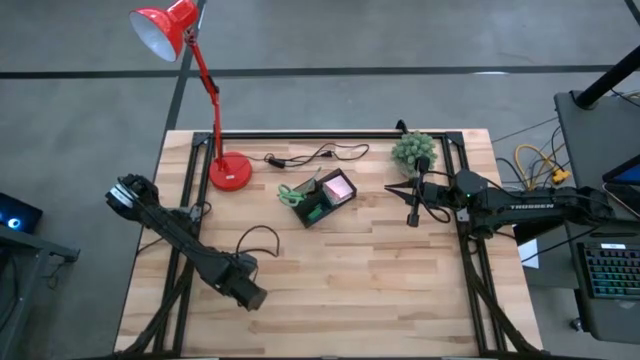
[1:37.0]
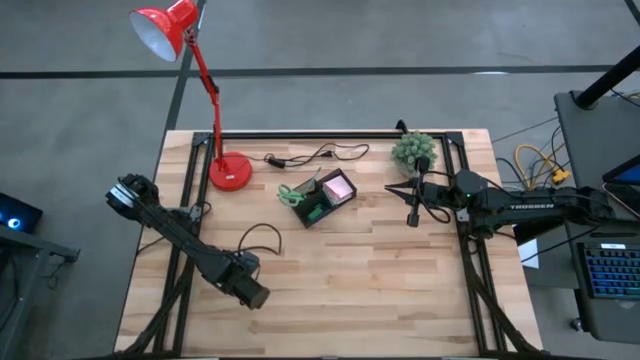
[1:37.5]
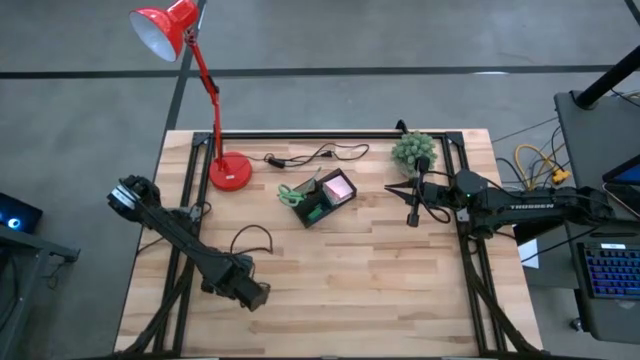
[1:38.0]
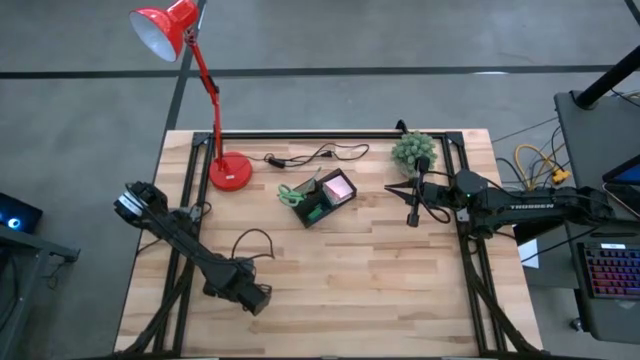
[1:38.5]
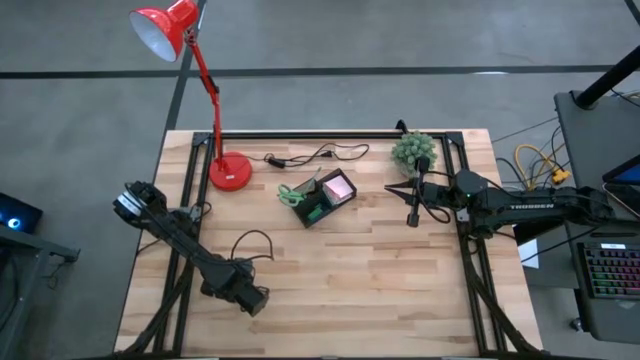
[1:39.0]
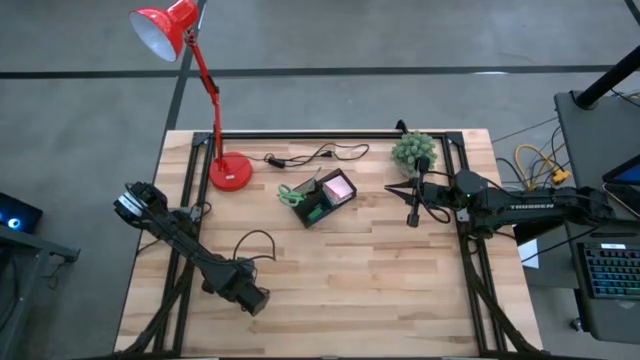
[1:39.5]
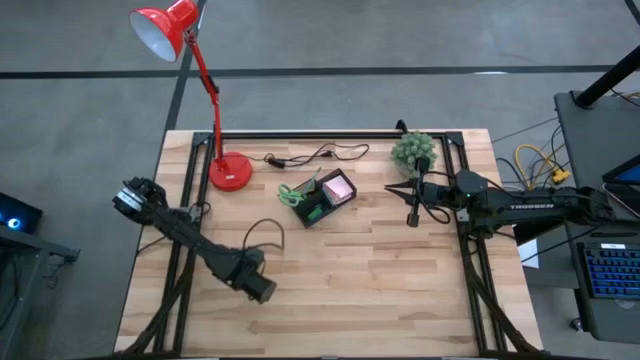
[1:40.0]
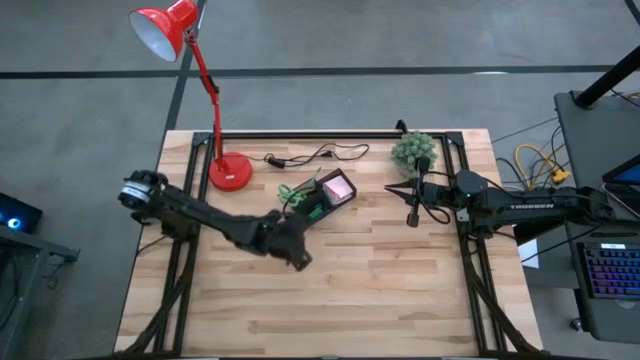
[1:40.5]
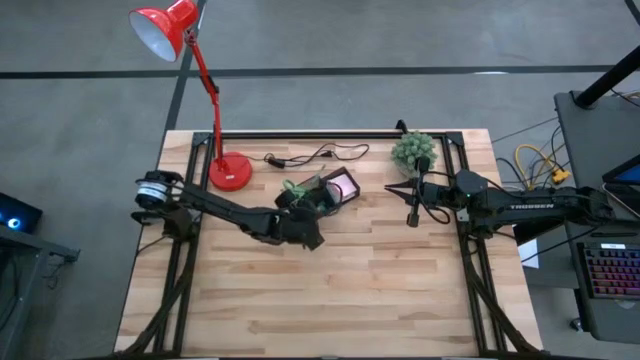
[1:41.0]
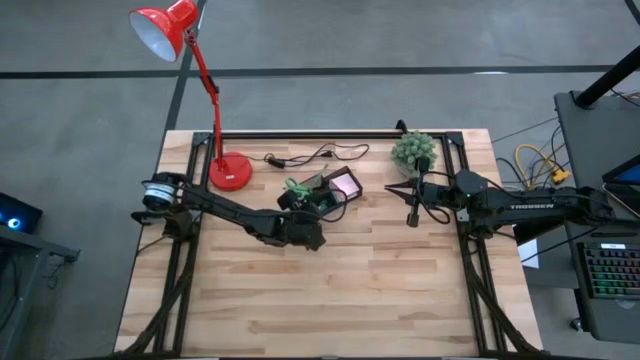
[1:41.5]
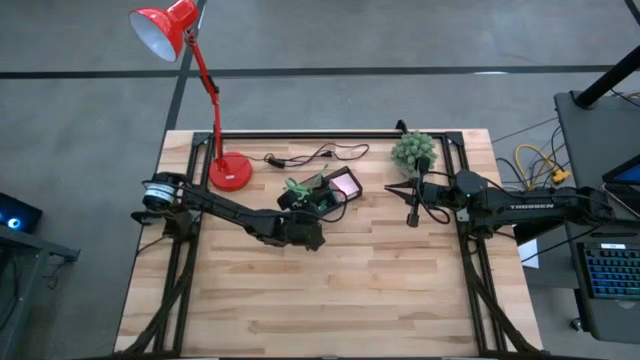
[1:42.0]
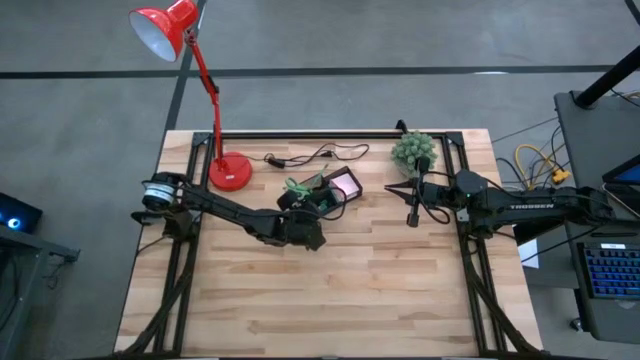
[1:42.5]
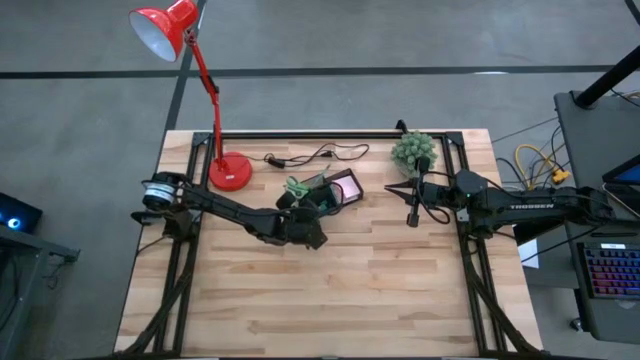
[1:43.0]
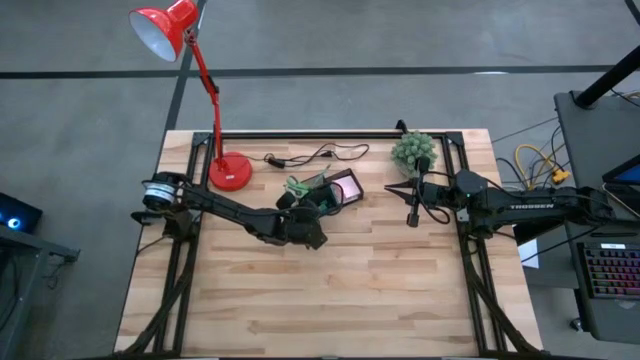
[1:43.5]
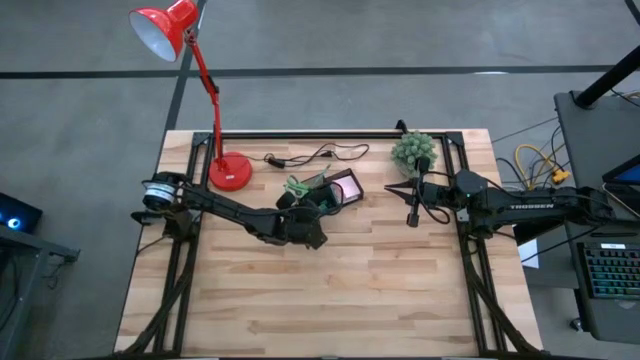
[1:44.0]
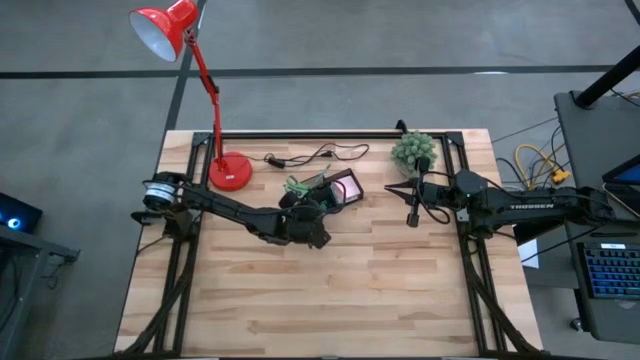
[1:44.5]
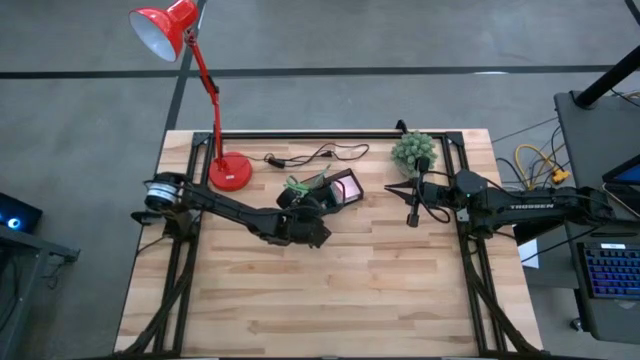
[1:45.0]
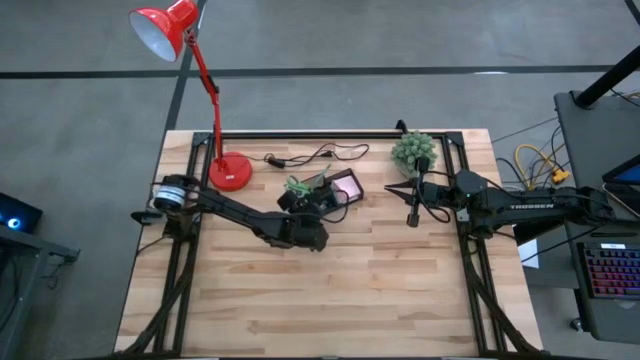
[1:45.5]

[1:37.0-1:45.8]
Task: Pick and place office supplies into organizer
Put the pink eraser into the black desk organizer

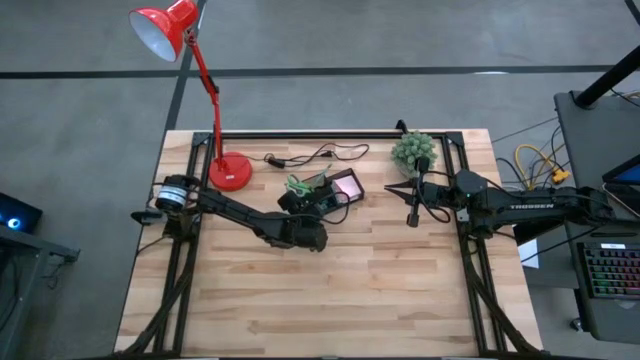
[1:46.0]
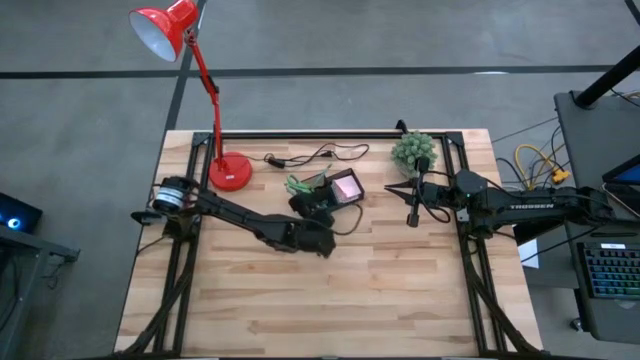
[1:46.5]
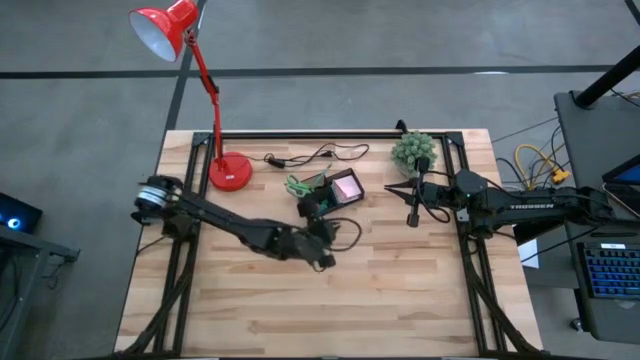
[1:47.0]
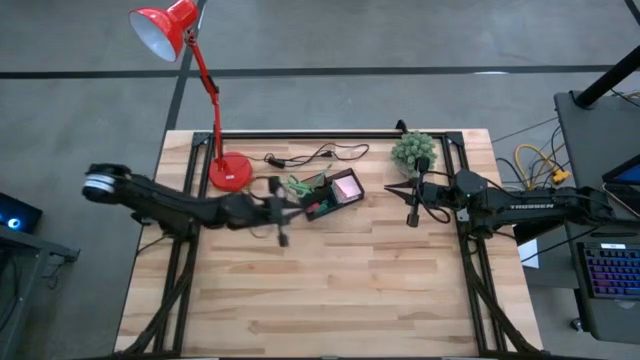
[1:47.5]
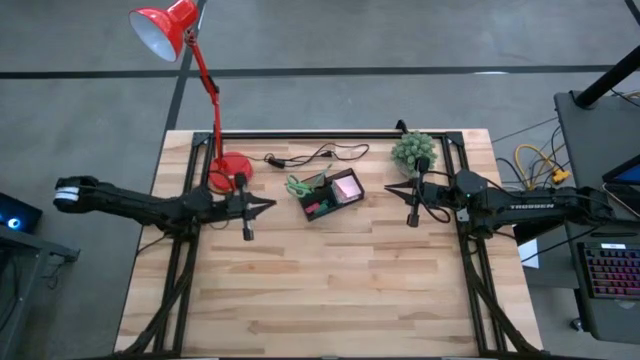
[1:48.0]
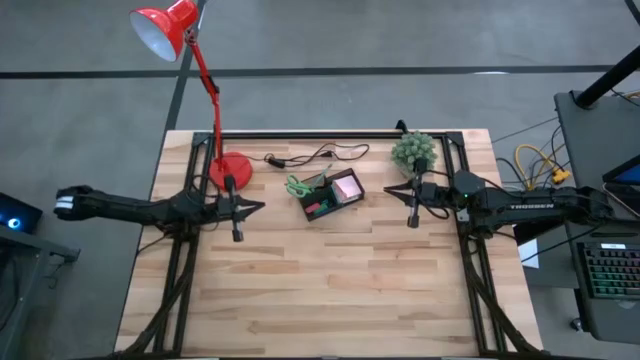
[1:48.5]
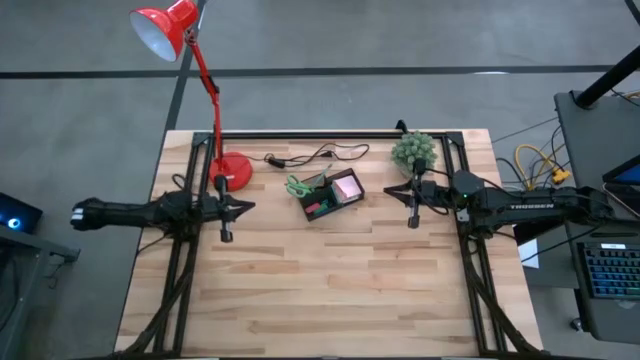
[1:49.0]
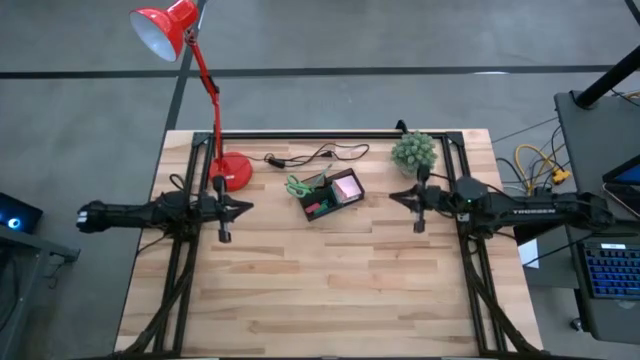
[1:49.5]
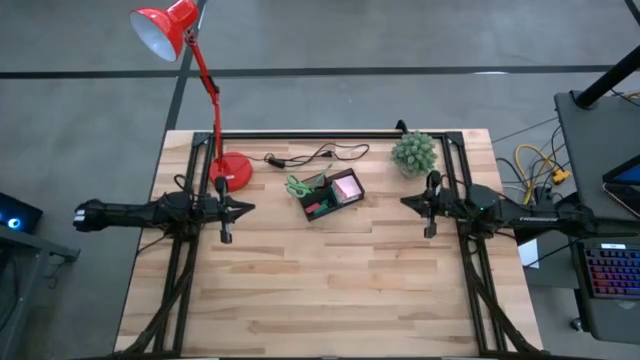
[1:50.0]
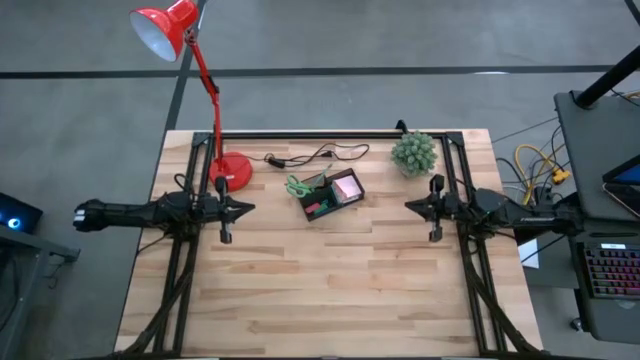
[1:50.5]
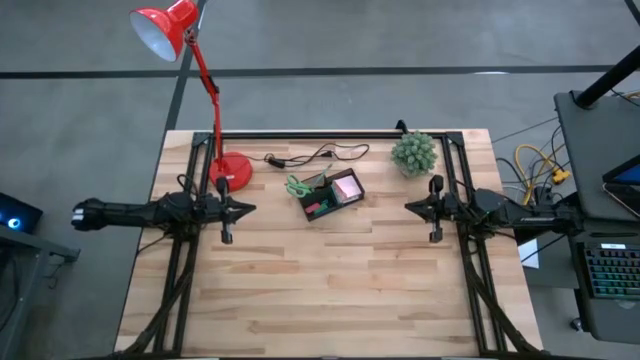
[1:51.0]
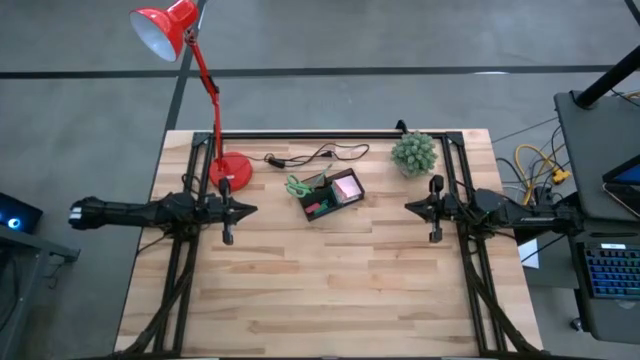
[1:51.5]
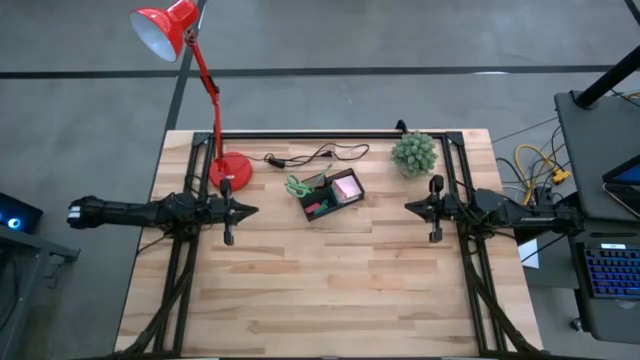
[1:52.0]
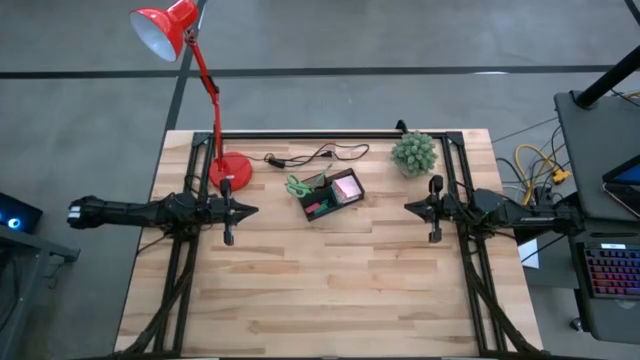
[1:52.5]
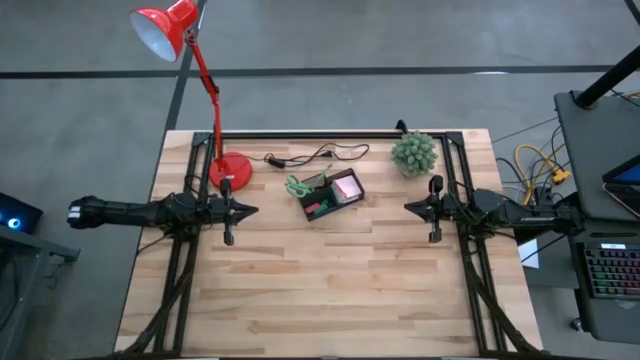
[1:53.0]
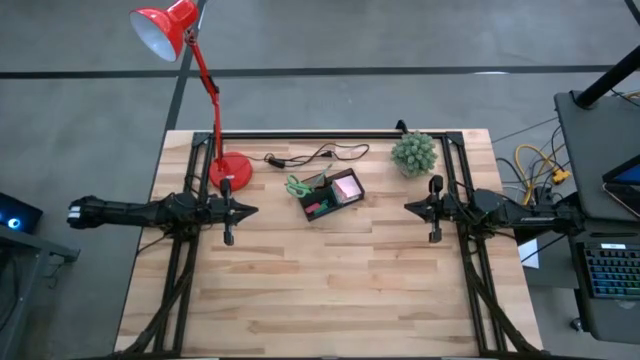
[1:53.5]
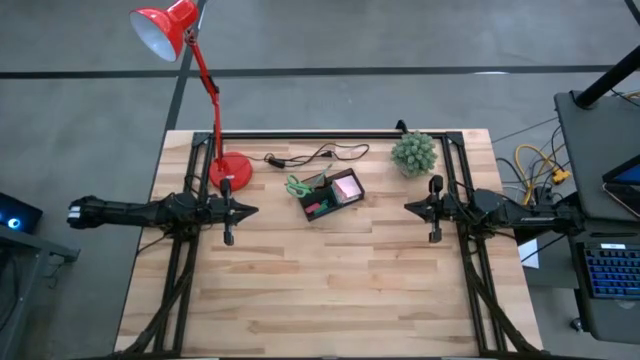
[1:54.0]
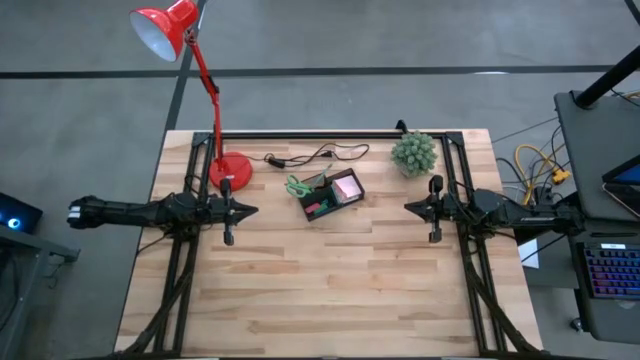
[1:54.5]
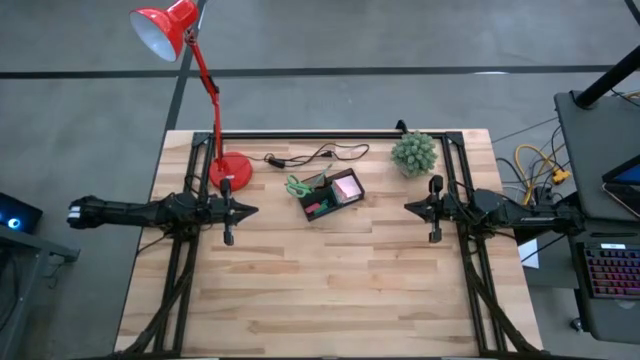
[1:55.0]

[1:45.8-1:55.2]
Return to Home Position

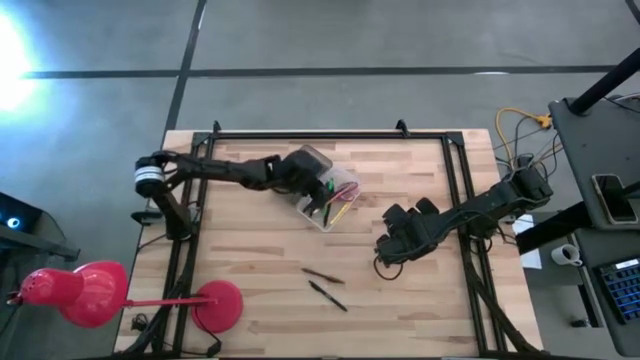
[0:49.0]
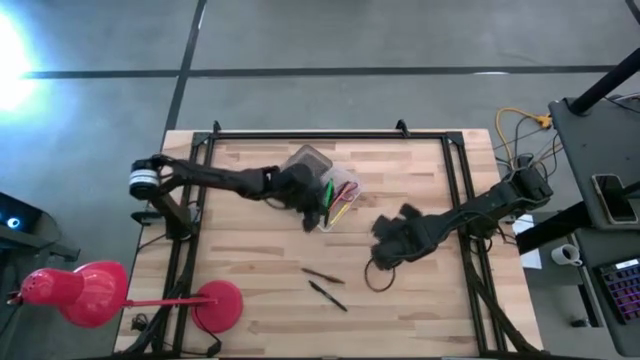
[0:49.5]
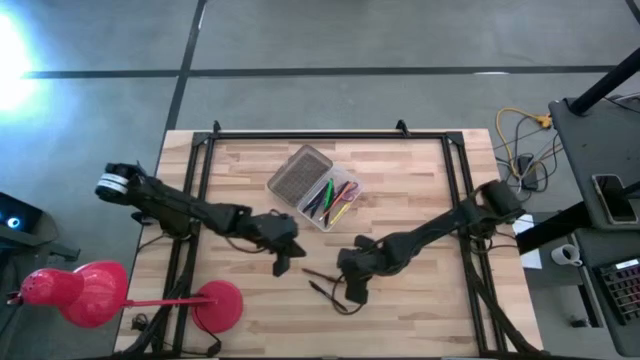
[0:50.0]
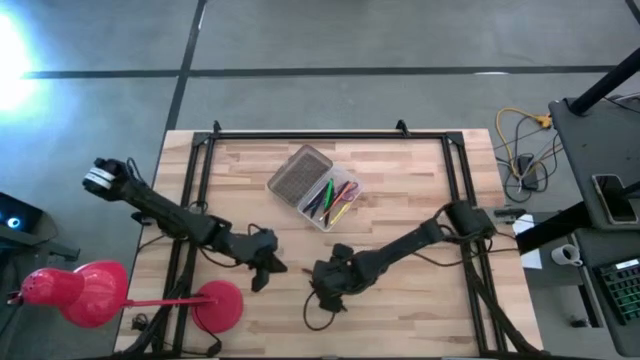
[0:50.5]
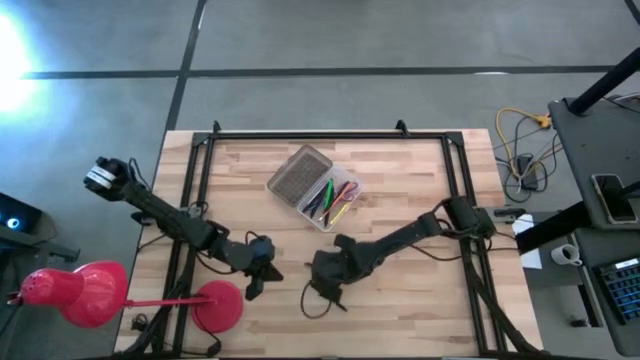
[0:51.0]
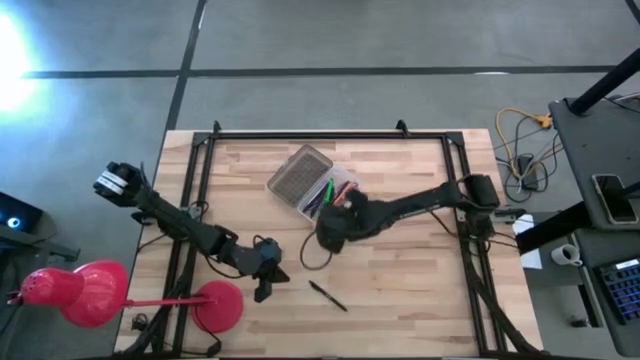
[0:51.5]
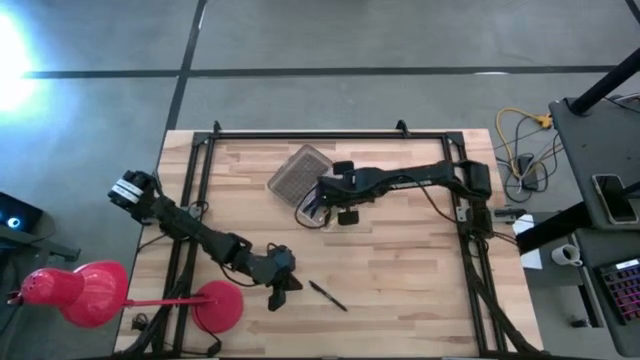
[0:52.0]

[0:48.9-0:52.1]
Task: Pick & place school supplies into a supply box
Put the brown pen into the supply box

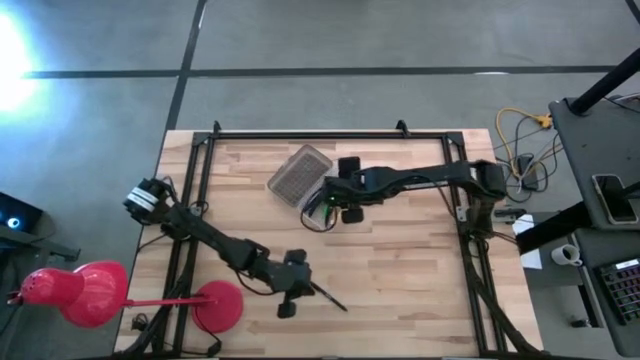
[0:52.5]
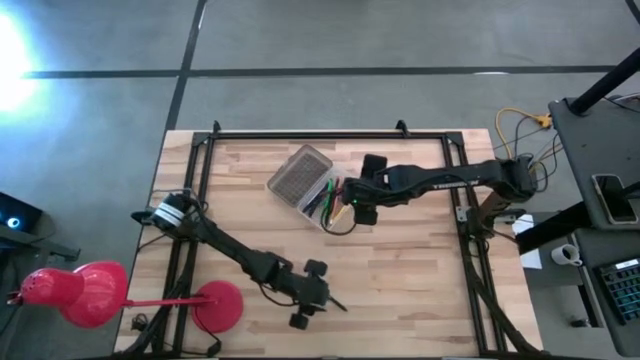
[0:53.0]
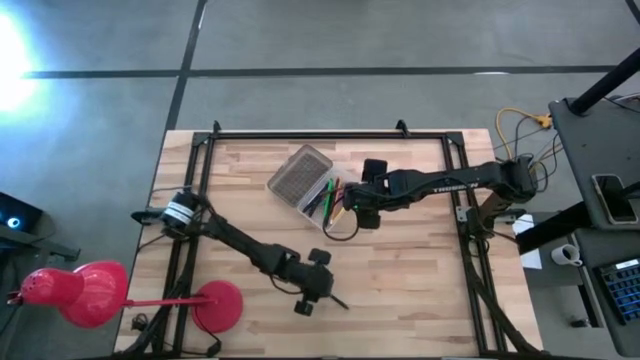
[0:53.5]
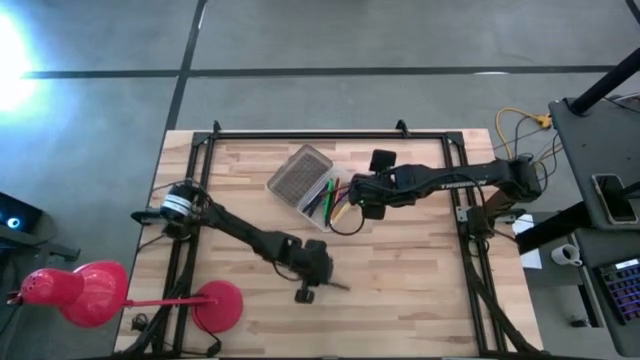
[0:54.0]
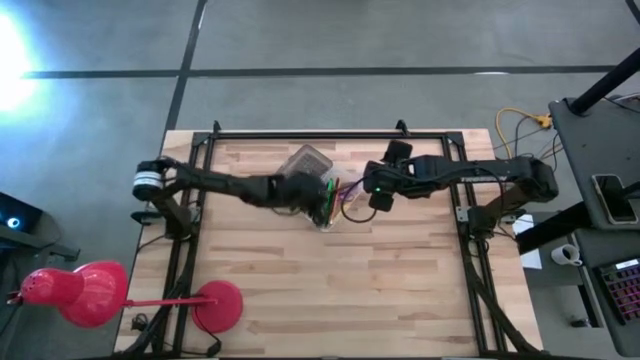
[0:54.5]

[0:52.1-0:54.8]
Put the black pen into the supply box
